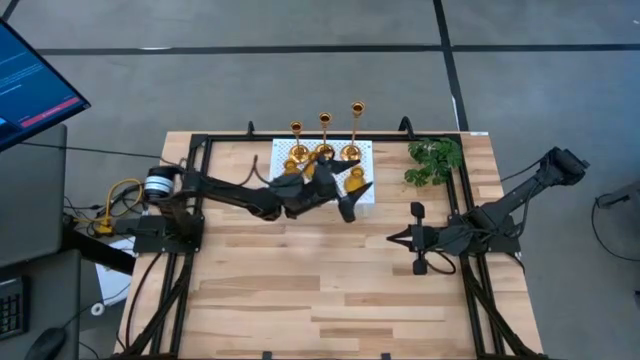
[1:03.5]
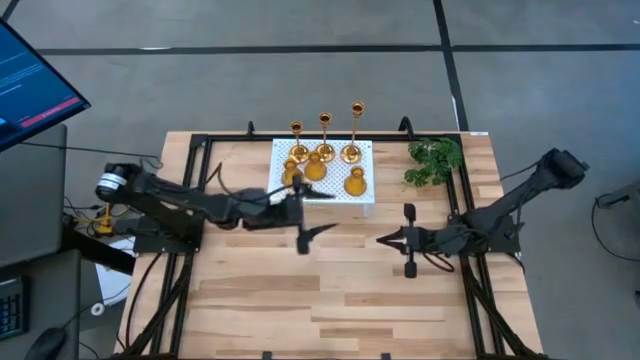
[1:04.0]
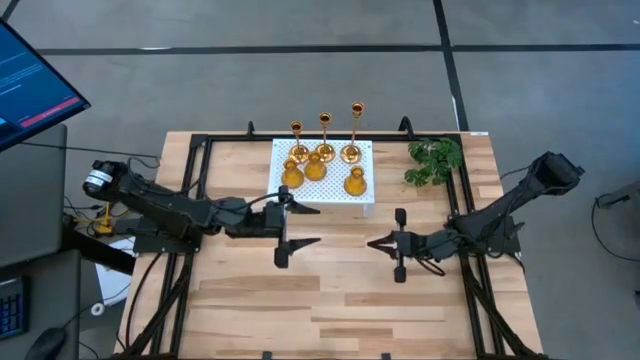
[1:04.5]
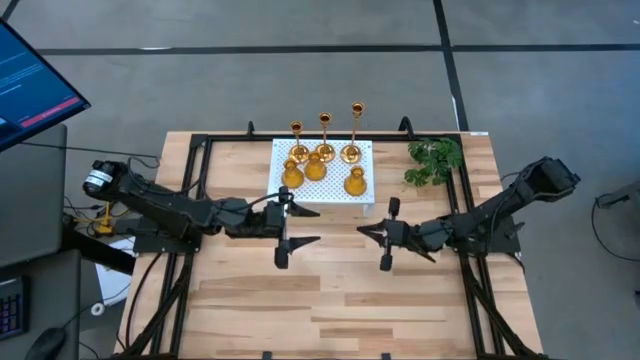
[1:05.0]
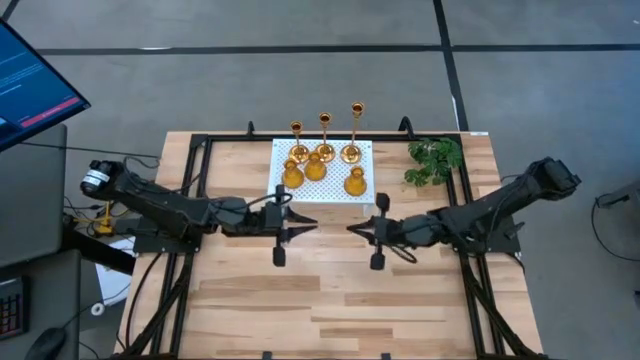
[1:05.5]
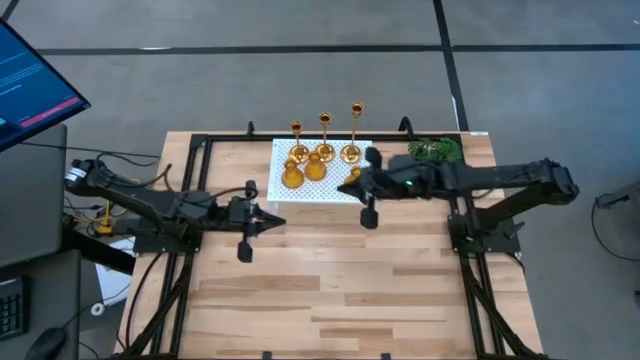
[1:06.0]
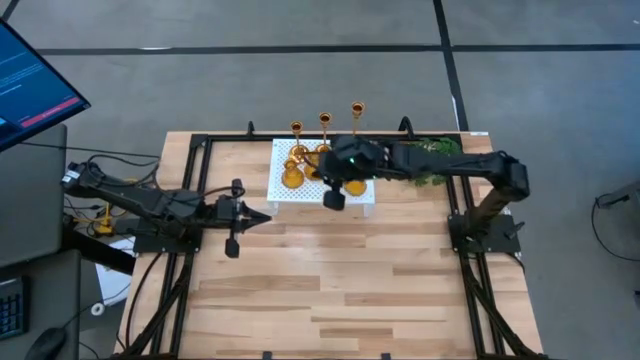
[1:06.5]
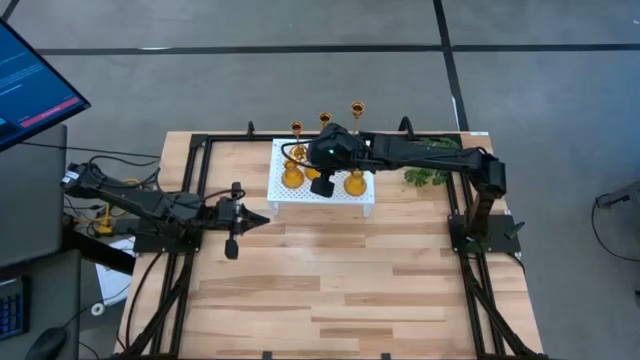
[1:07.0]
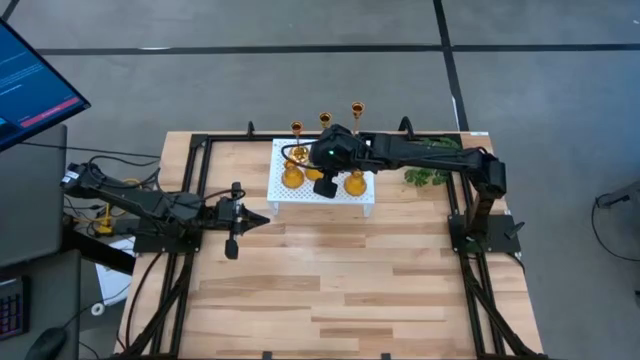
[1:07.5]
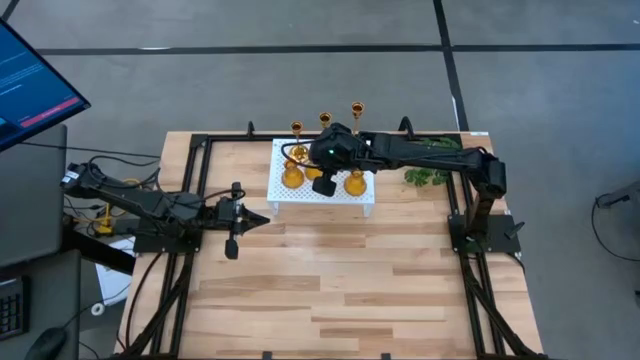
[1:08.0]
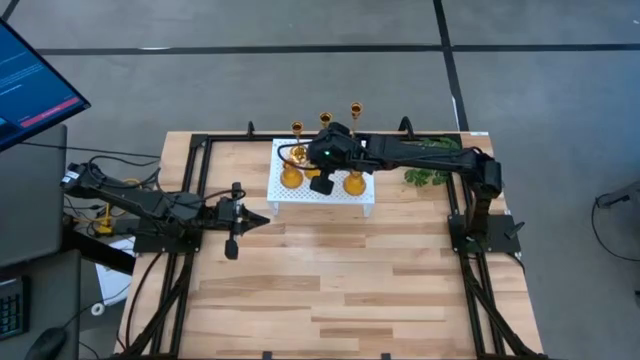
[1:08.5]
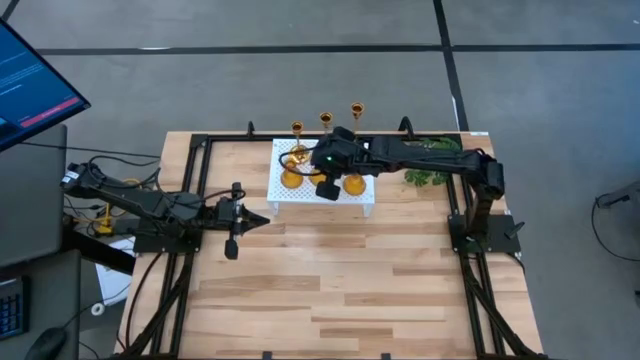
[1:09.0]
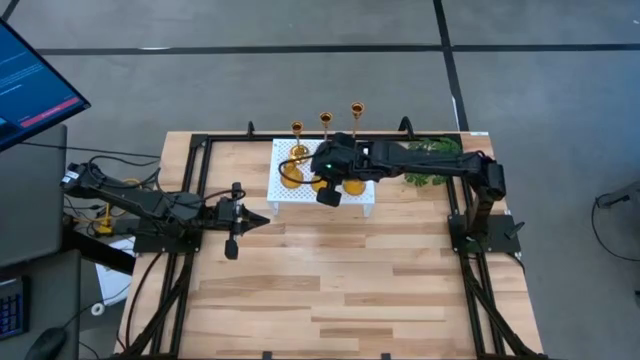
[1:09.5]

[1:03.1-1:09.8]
Task: Pick & Place candle stick holders
Adjust the yellow glass candle holder on the shelf

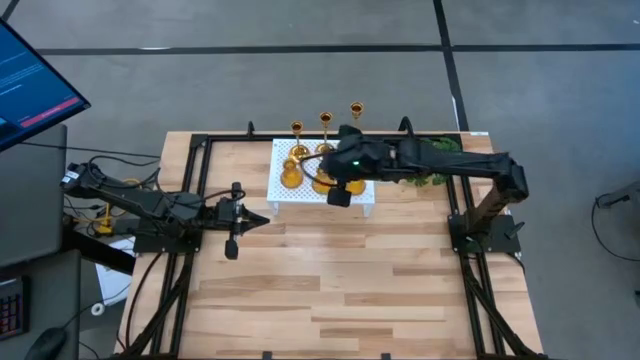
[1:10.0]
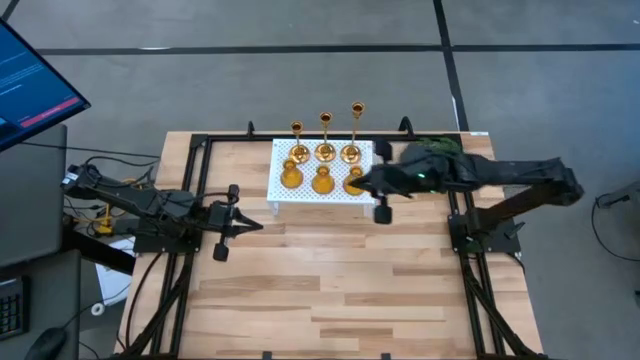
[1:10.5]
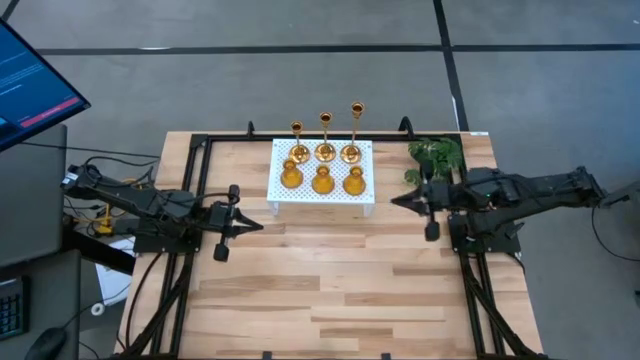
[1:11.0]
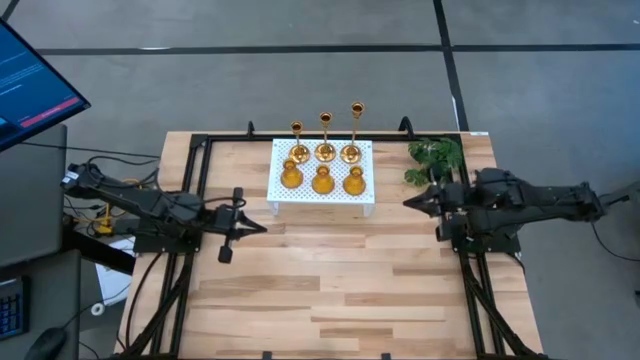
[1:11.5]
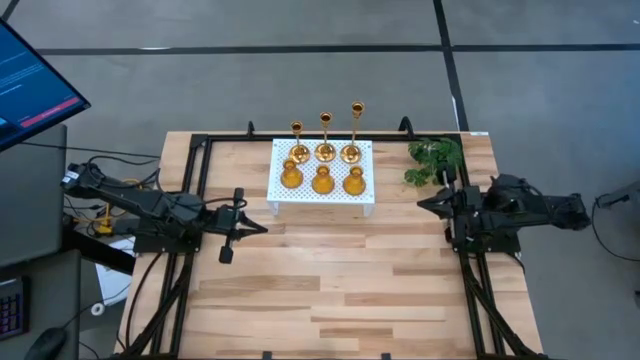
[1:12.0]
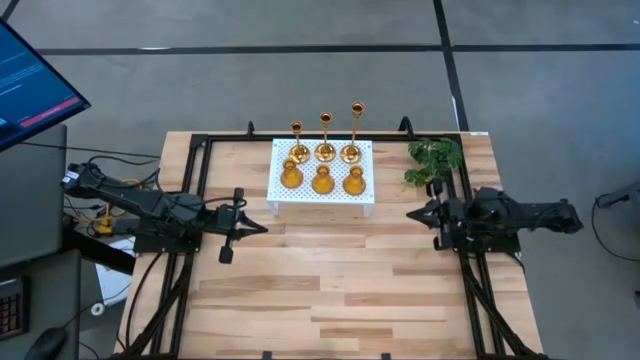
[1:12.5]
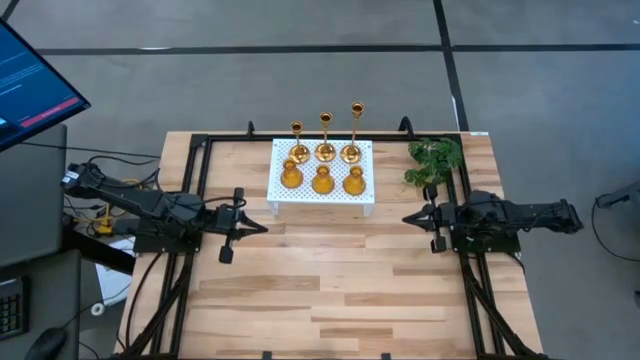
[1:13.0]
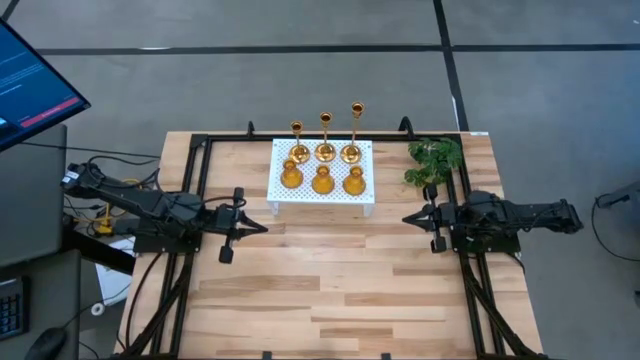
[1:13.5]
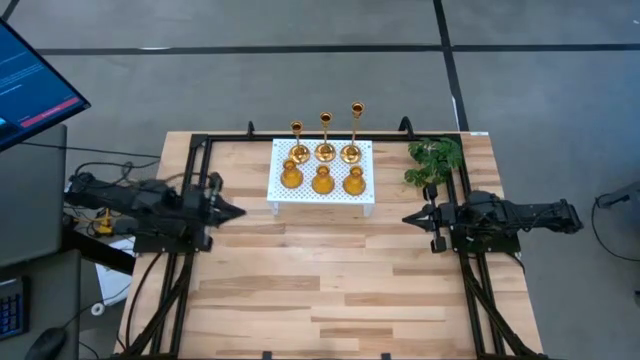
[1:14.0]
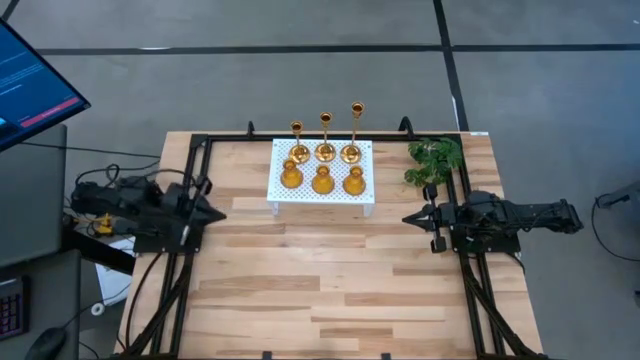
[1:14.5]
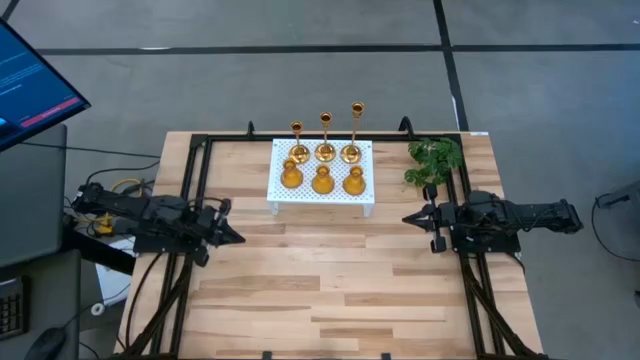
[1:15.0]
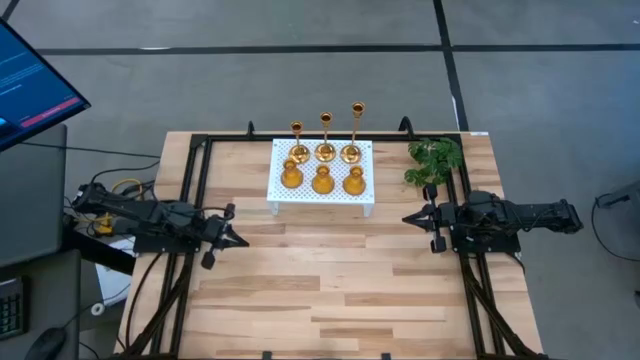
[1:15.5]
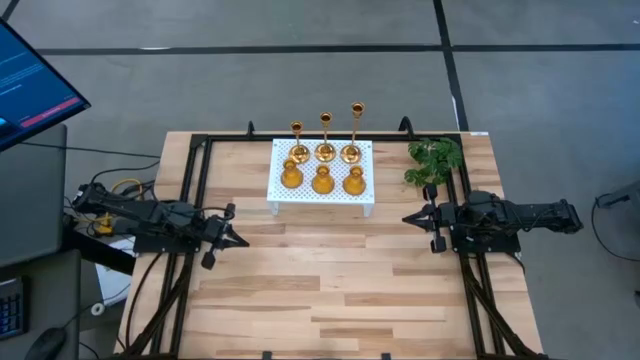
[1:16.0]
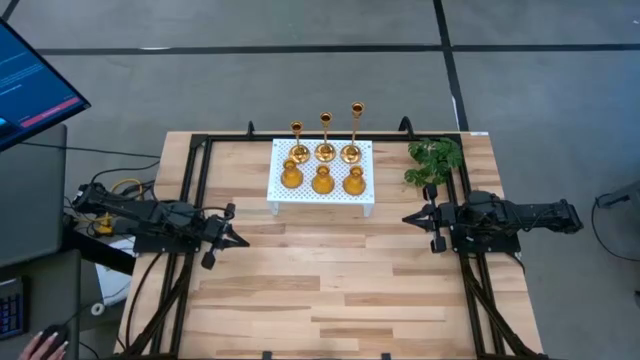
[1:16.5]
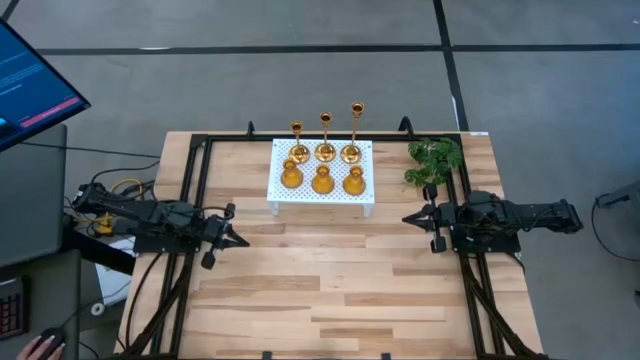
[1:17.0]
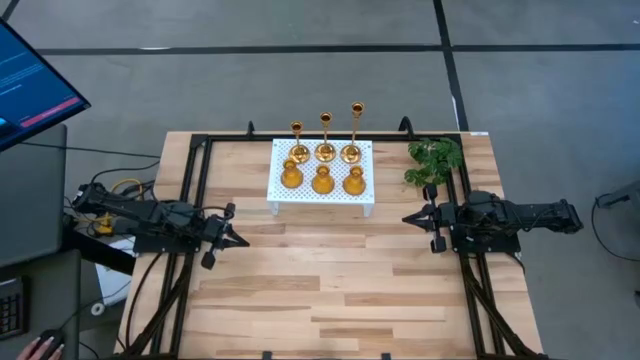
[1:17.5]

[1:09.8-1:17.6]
Return to Home Position

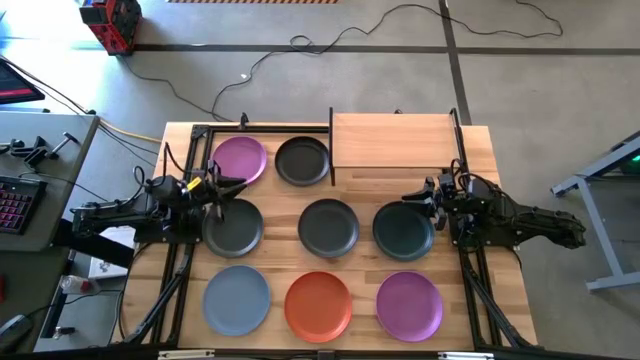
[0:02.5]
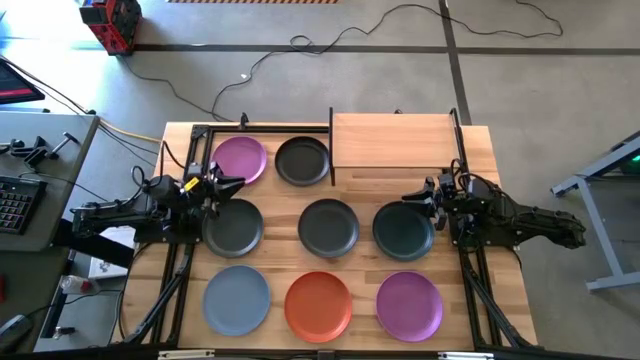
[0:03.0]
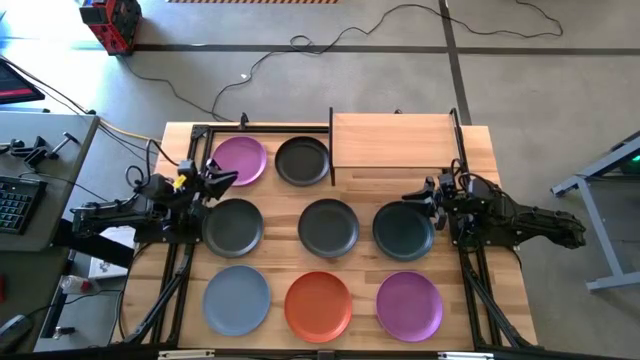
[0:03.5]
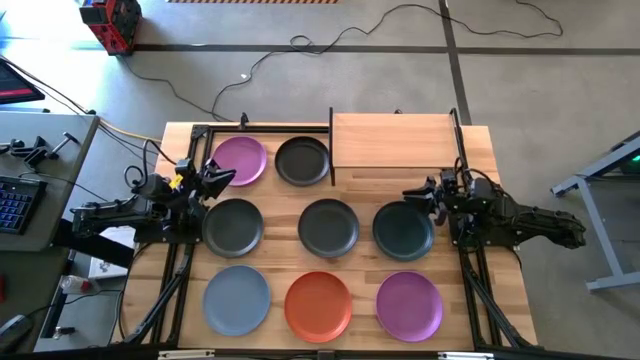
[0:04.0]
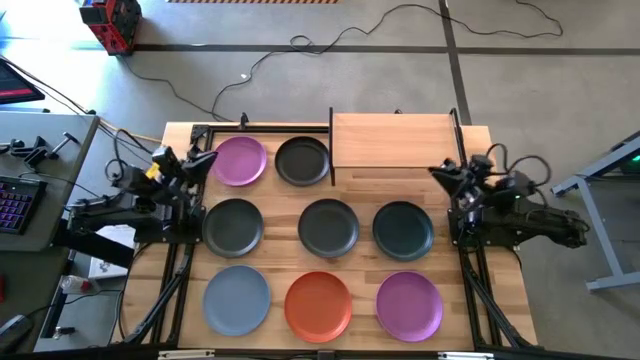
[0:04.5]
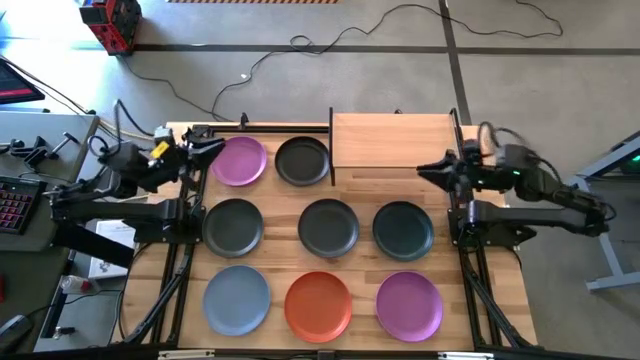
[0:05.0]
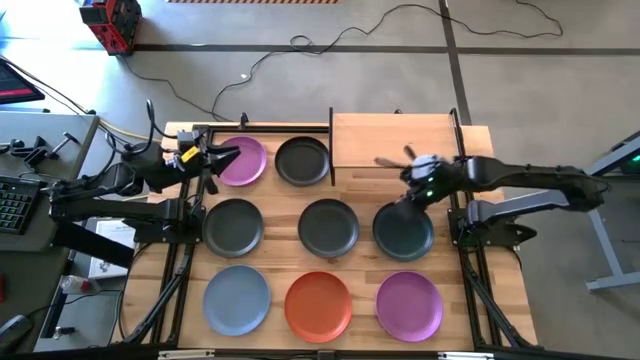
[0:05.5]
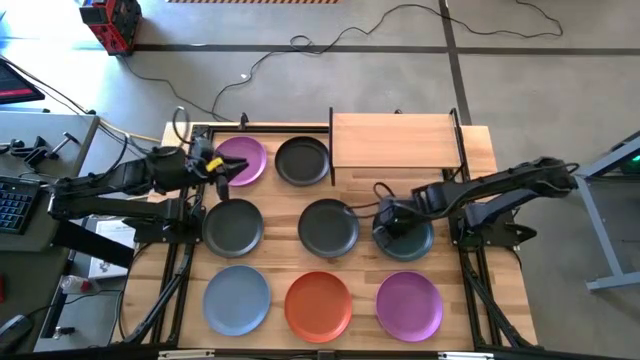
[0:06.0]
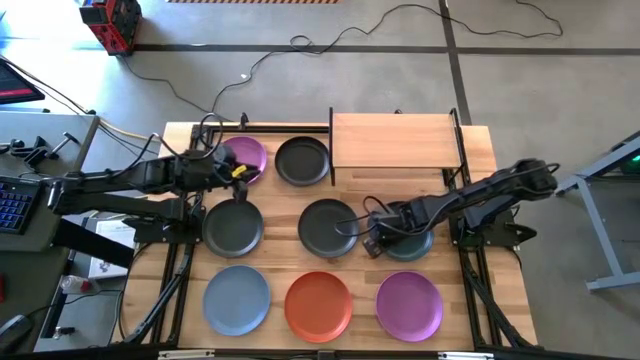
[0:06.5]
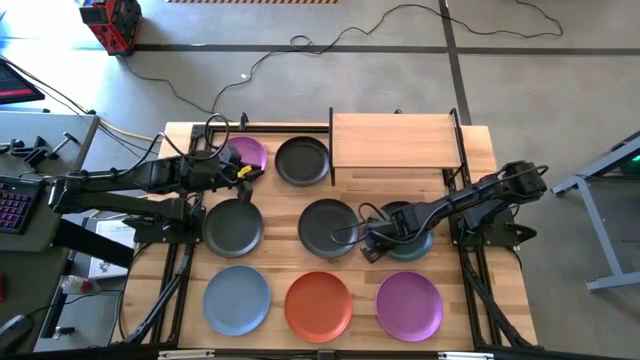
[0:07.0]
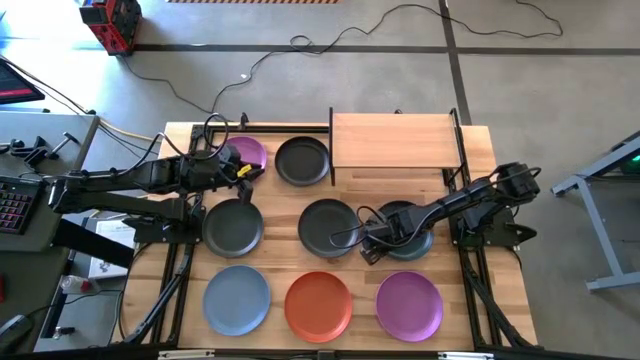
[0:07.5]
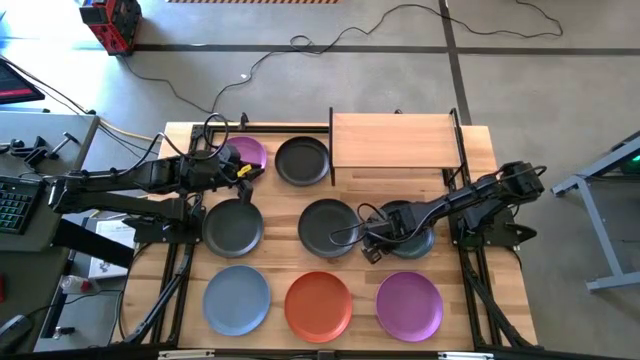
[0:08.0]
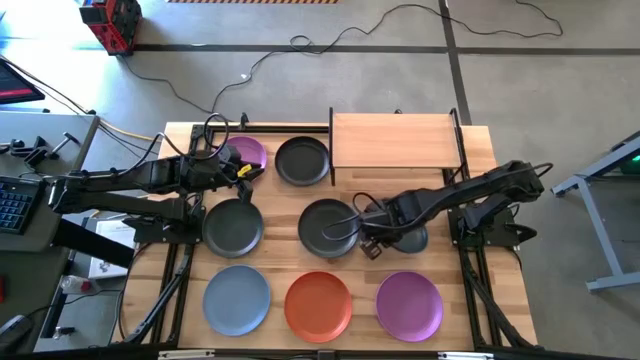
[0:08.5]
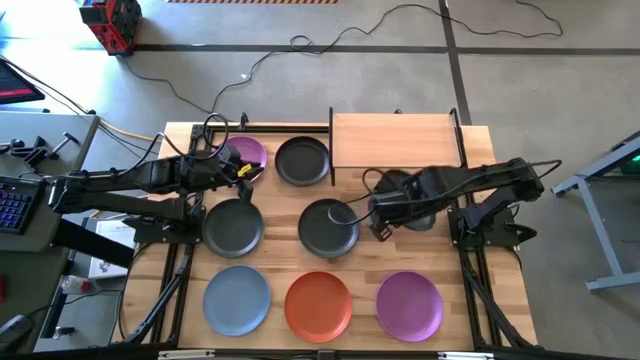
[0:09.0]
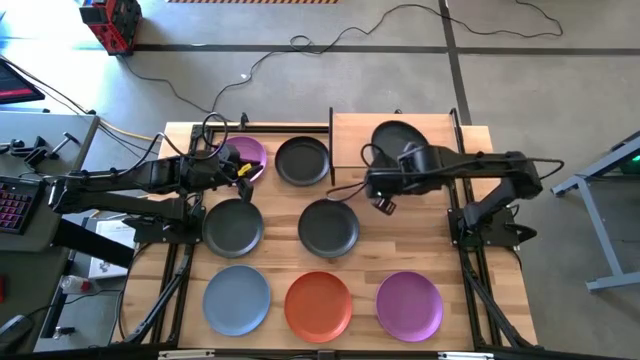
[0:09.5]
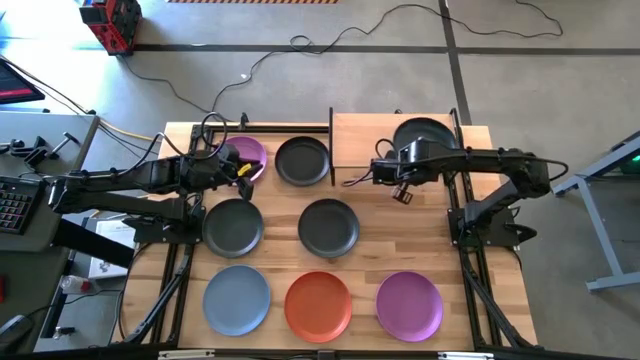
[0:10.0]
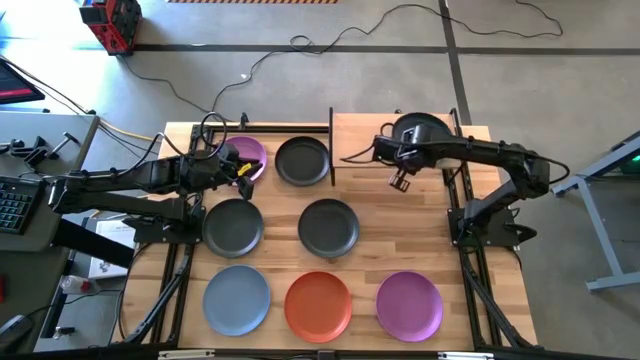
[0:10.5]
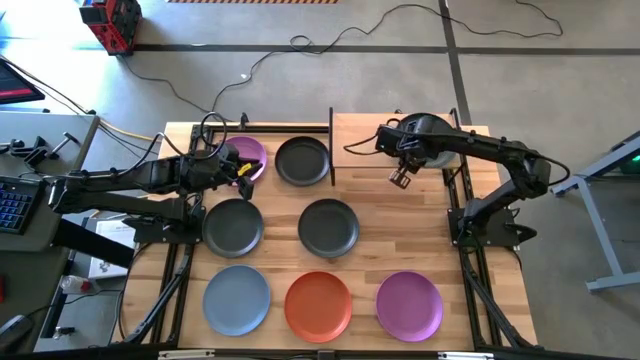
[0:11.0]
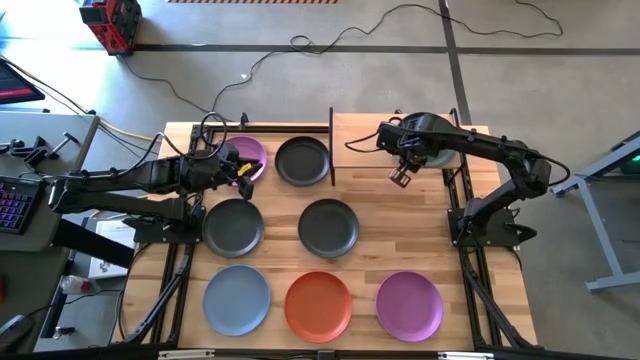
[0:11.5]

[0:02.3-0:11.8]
Task: Place and stack plates onto a shelf
Put the black plate on the shelf
